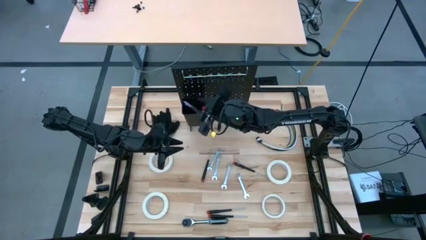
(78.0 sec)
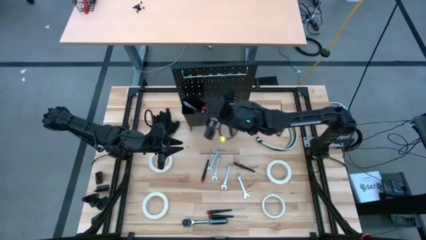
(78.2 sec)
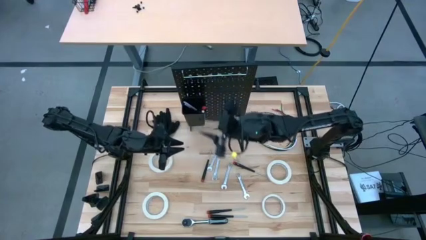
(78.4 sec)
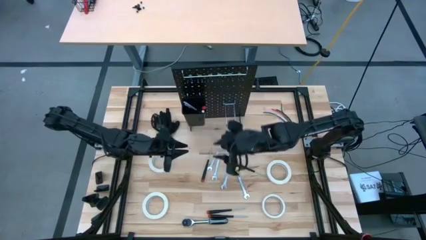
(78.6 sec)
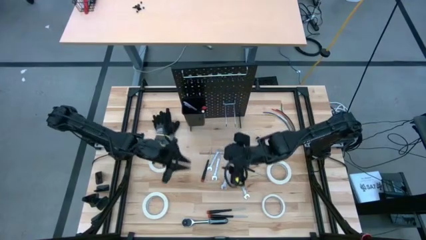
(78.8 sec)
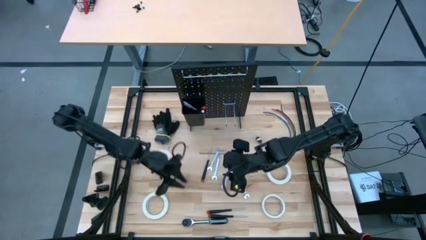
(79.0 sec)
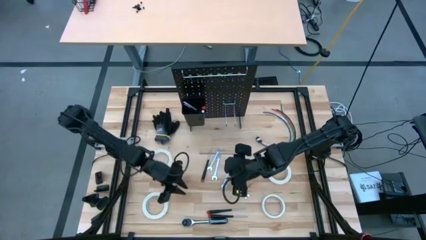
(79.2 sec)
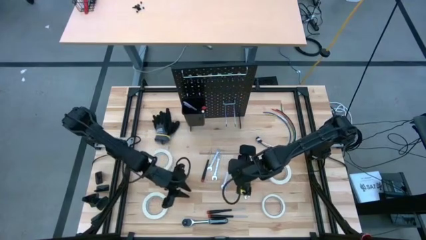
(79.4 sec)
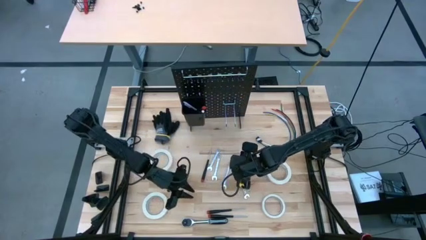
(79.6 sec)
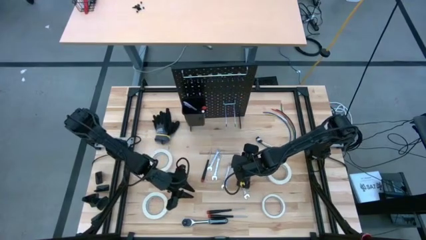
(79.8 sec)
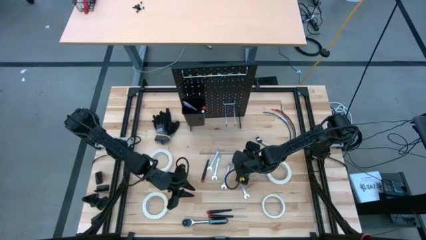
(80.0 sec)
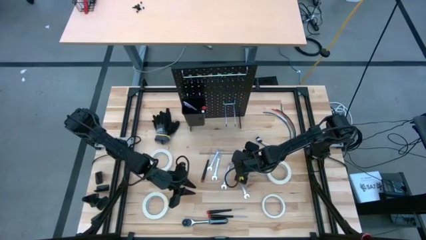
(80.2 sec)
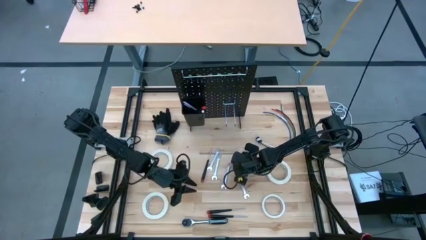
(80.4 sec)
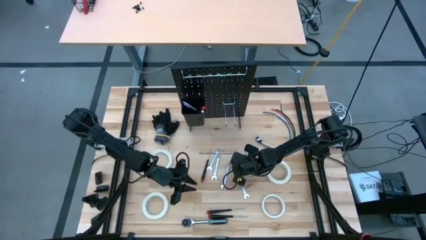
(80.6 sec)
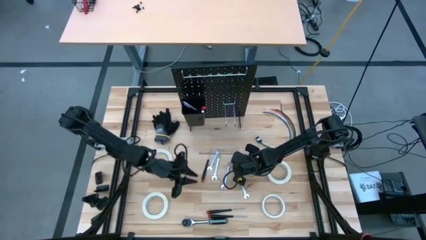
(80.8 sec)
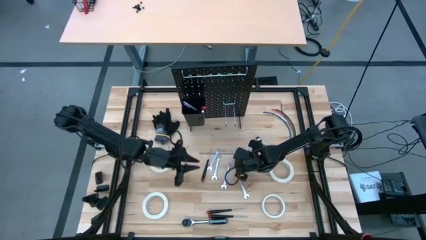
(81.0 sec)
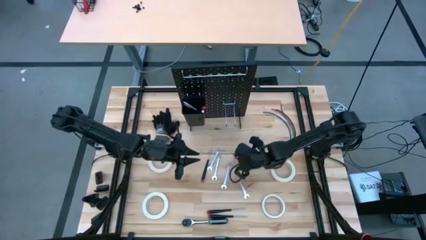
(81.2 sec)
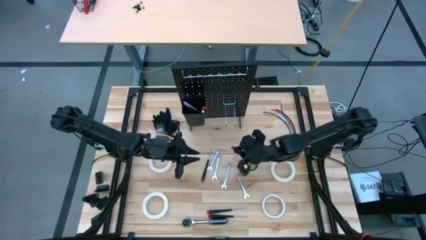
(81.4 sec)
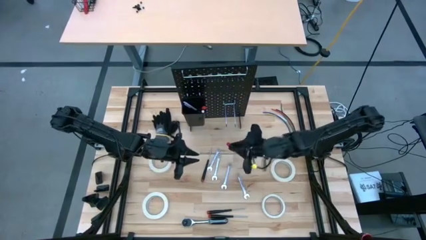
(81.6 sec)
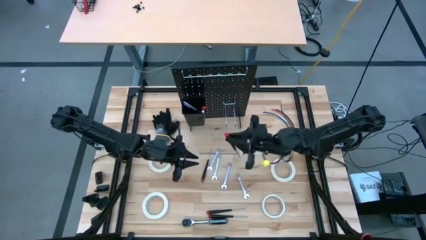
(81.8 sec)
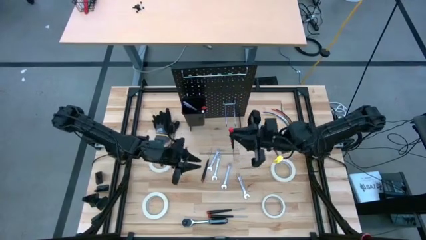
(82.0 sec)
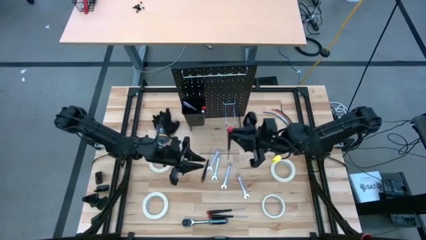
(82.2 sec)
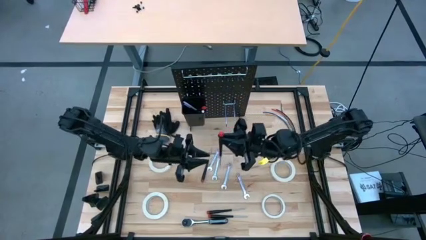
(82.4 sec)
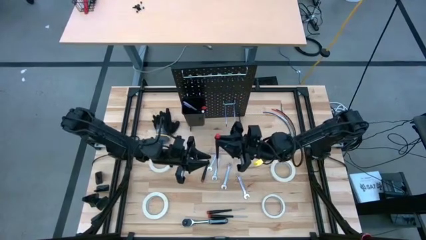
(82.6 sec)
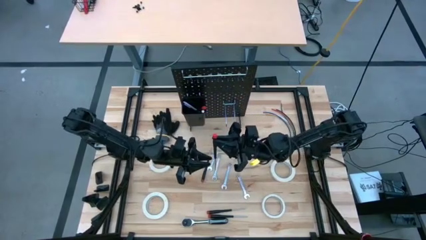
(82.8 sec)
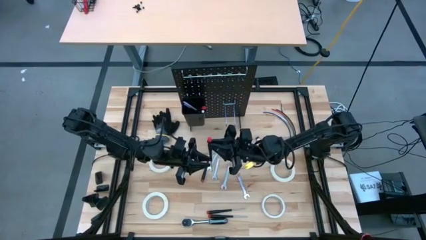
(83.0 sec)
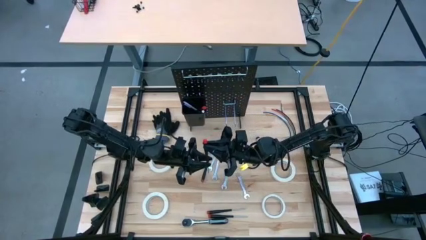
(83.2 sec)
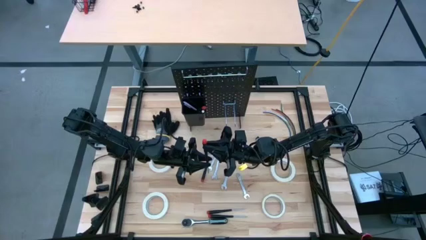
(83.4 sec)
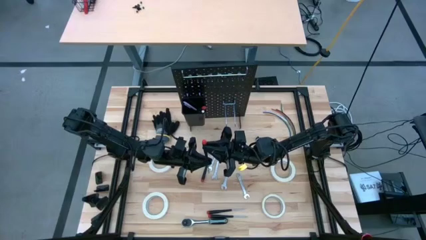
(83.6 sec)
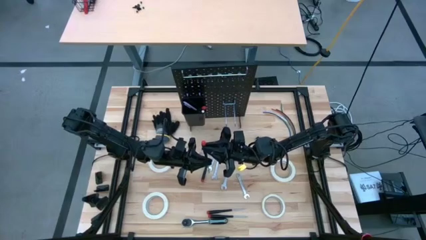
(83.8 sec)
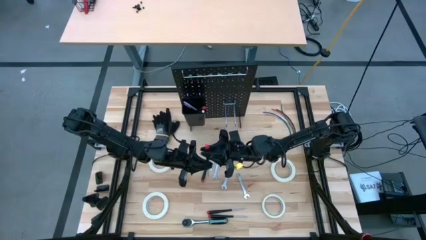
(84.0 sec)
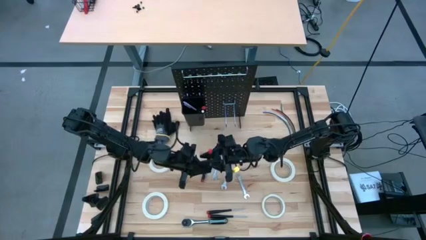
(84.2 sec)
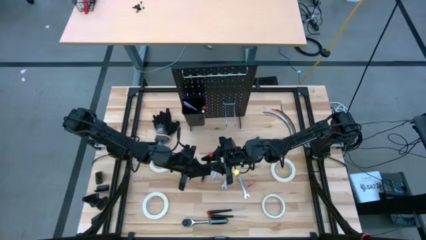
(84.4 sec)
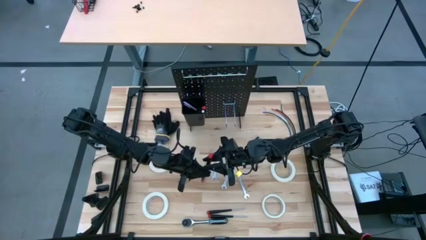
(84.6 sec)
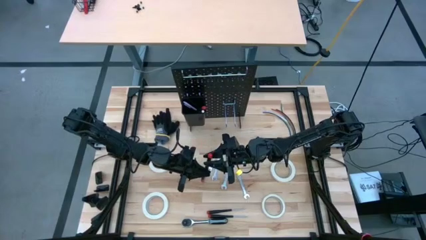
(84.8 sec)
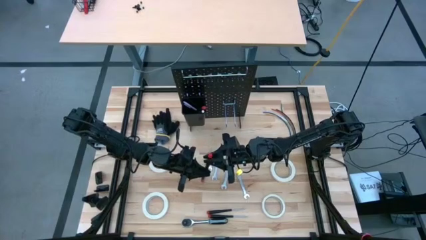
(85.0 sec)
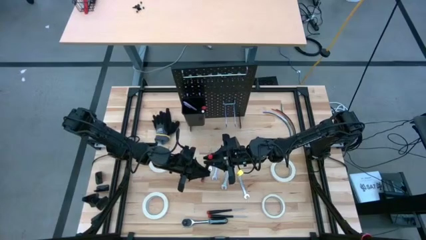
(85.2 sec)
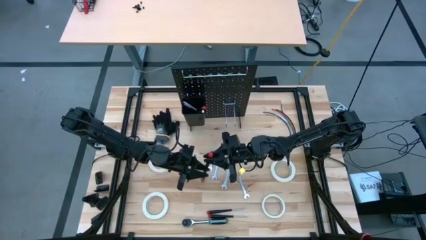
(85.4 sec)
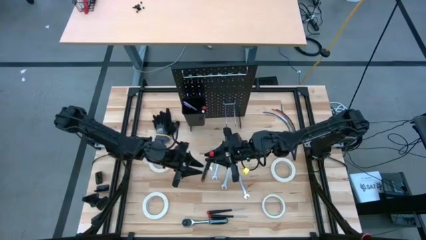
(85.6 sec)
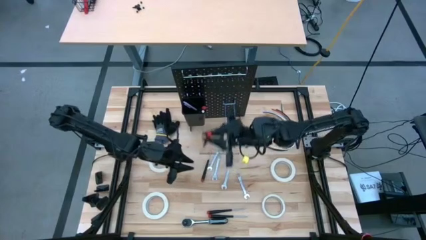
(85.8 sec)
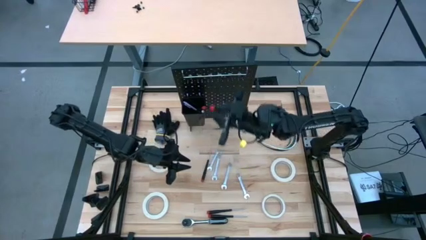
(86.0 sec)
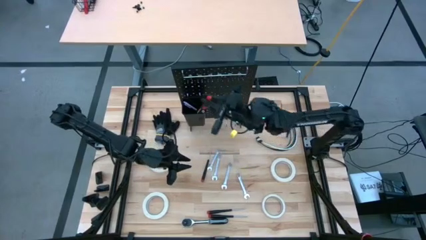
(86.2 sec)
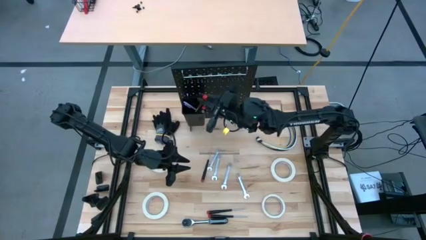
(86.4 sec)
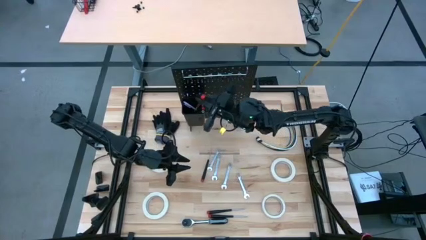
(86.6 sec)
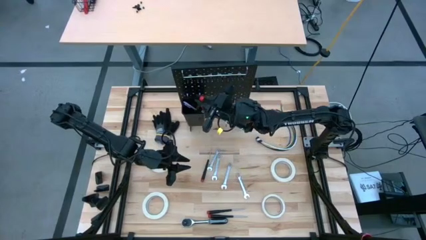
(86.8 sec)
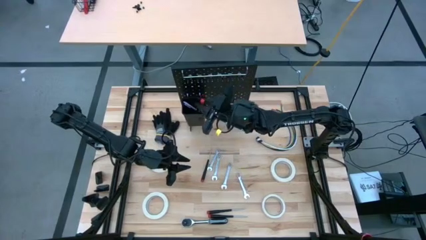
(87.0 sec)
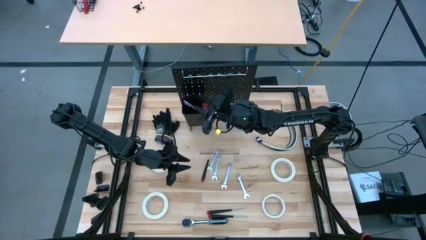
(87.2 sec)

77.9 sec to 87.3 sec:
Task: Hang tools onto peg board
Put the nut driver into the black bin on the peg board

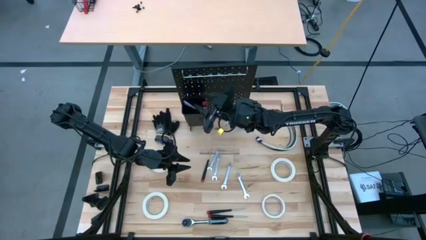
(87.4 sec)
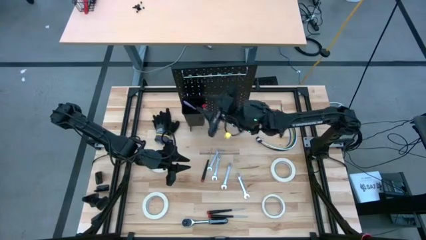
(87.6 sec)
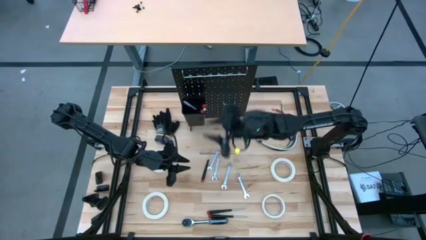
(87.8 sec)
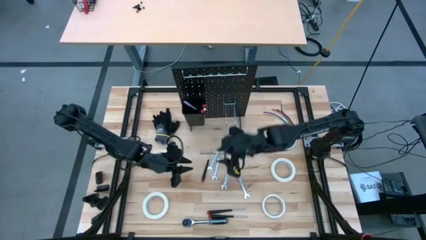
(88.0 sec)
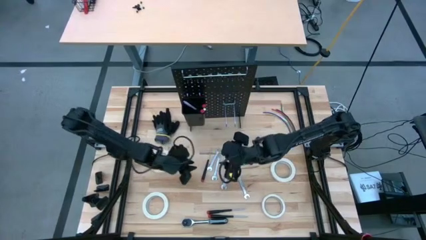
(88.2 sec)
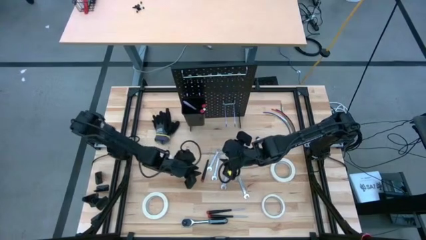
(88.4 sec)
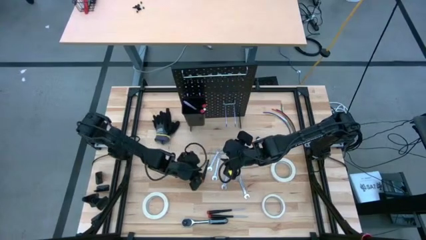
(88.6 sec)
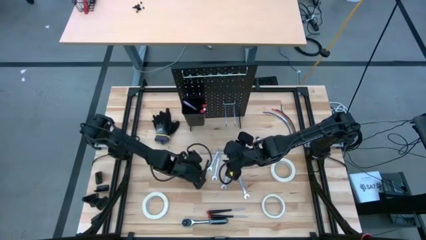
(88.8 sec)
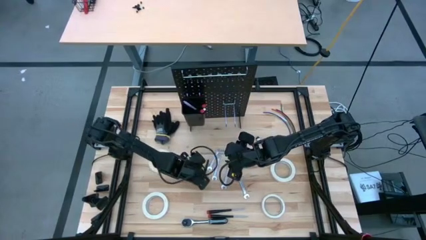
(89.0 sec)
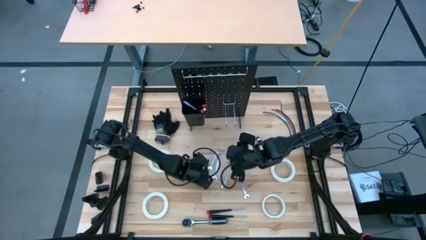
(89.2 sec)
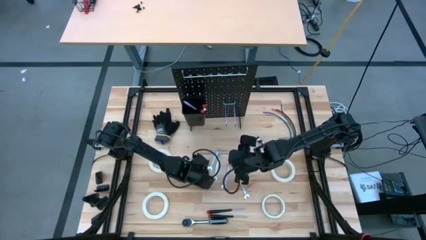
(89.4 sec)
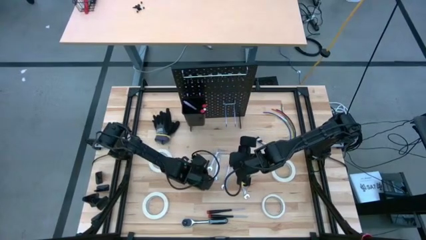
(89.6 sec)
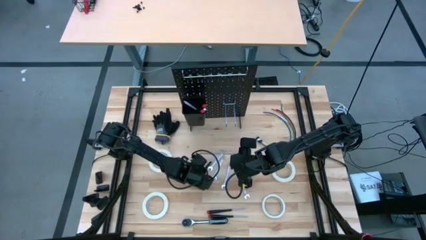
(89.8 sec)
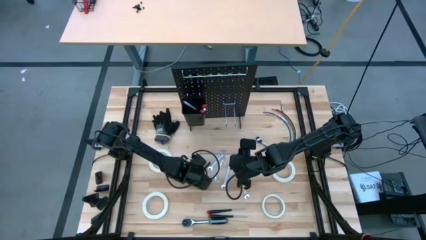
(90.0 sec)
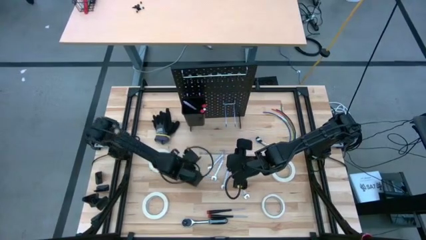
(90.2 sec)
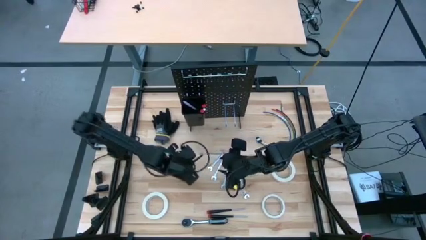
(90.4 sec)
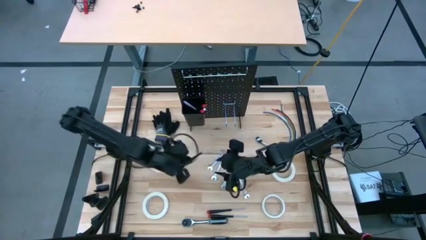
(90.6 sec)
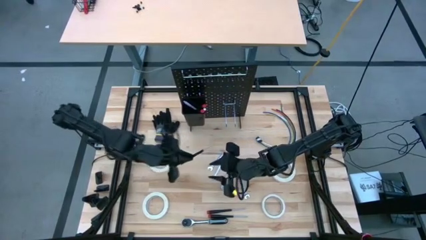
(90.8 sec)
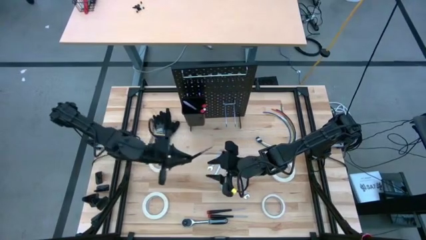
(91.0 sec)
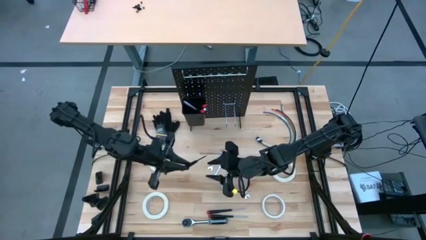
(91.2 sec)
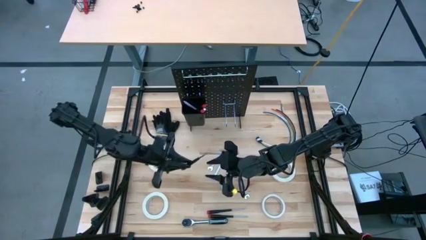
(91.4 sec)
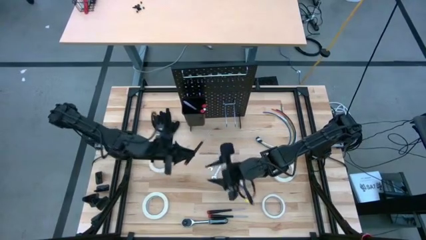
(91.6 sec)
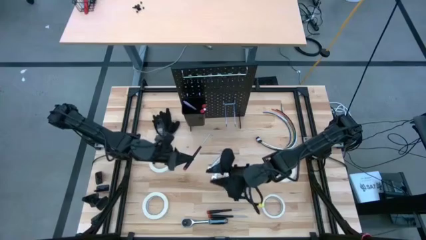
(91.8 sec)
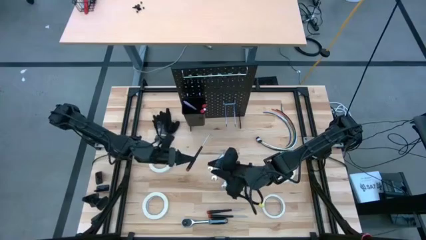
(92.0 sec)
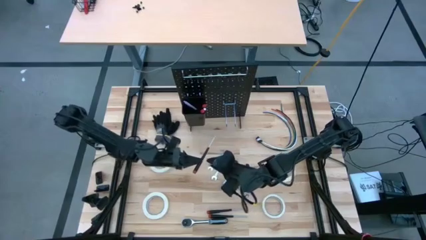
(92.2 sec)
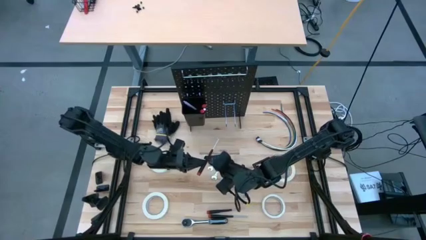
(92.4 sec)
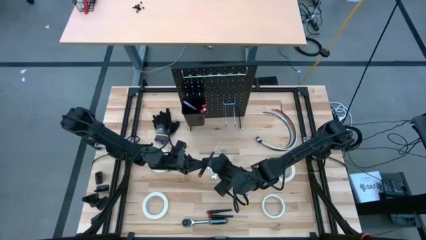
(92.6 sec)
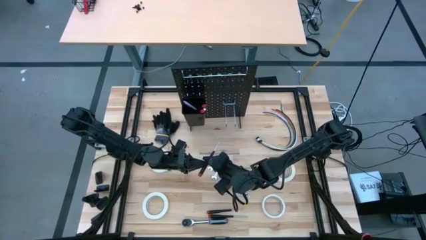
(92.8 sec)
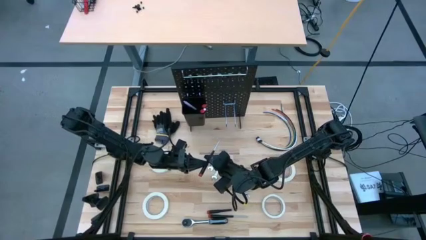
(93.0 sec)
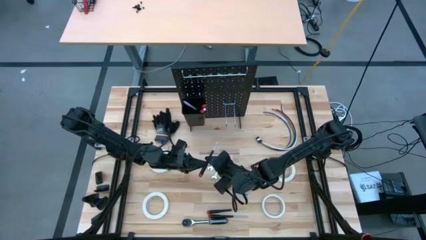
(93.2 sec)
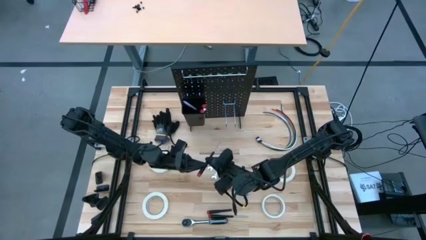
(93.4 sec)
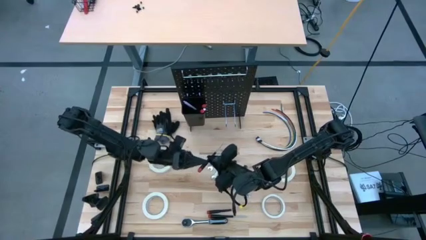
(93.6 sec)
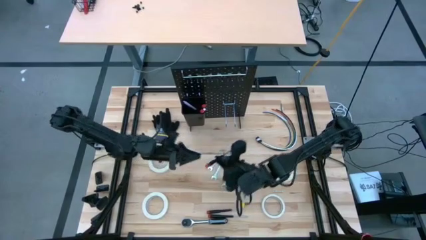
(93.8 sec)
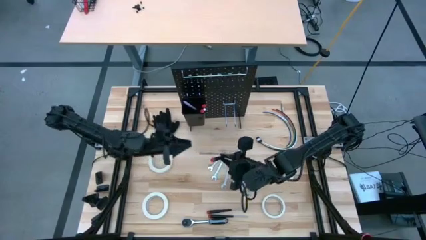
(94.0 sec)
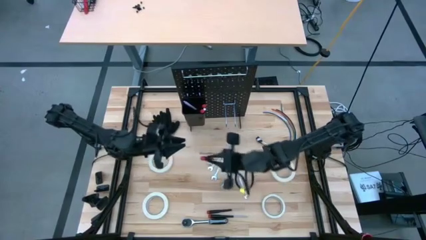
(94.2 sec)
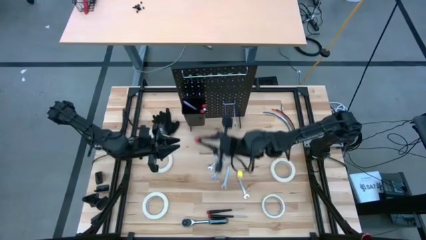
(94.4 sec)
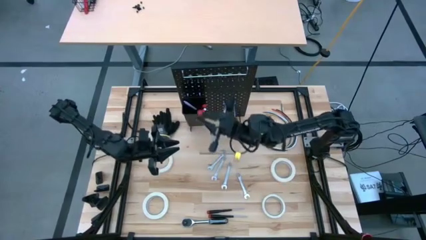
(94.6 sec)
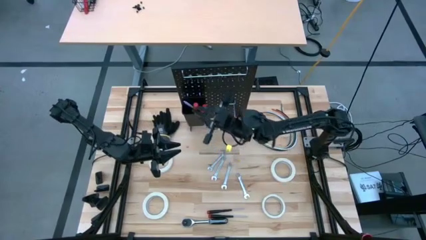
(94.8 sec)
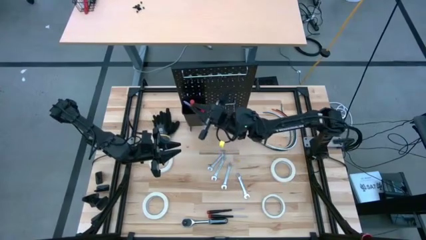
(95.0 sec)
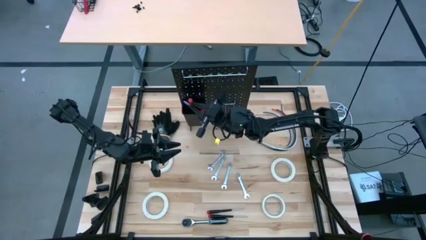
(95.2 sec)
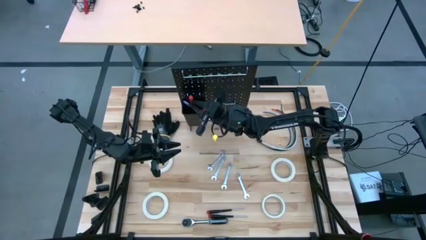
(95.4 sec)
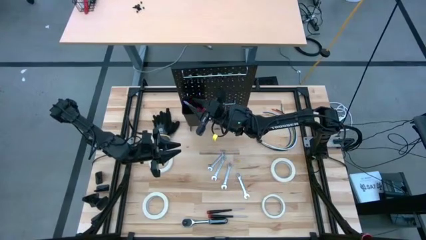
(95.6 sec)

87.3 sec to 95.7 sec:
Put the nut driver into the black bin on the peg board
